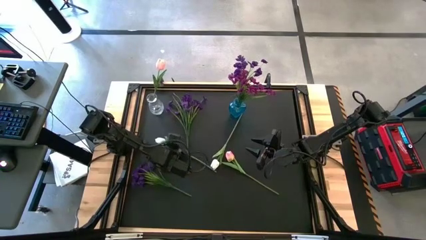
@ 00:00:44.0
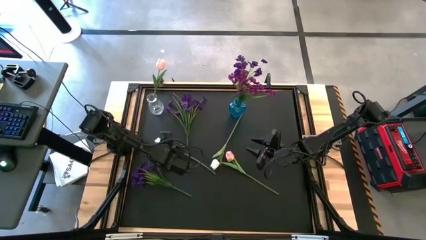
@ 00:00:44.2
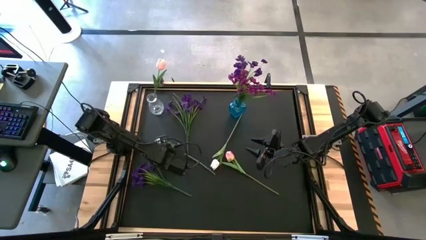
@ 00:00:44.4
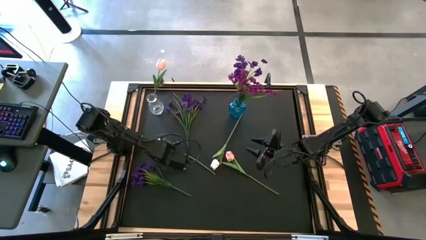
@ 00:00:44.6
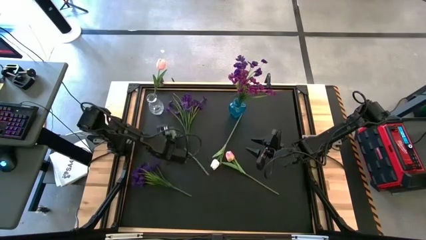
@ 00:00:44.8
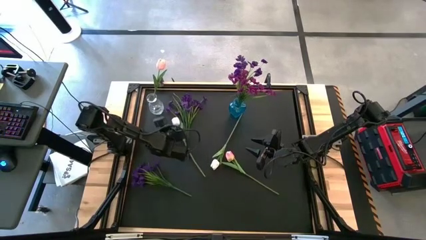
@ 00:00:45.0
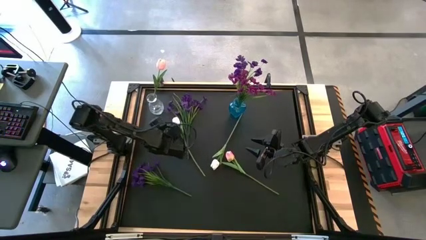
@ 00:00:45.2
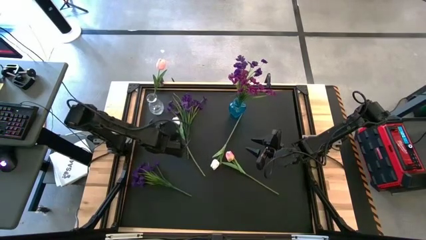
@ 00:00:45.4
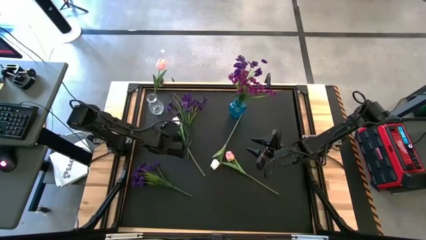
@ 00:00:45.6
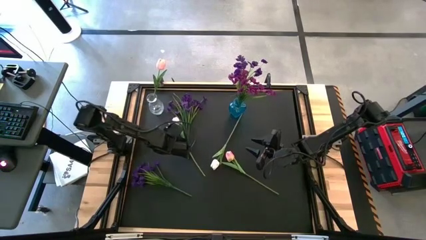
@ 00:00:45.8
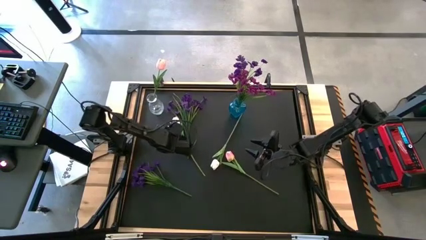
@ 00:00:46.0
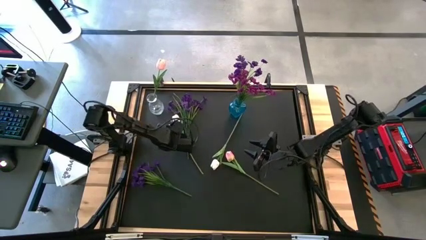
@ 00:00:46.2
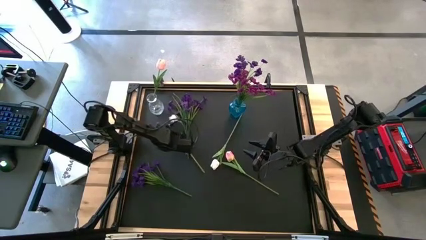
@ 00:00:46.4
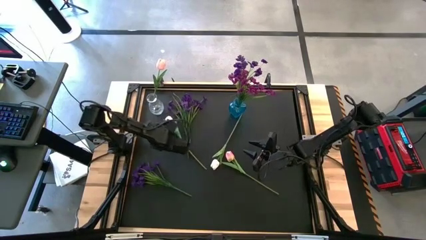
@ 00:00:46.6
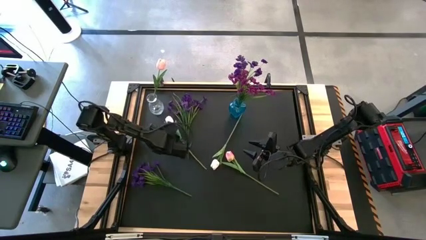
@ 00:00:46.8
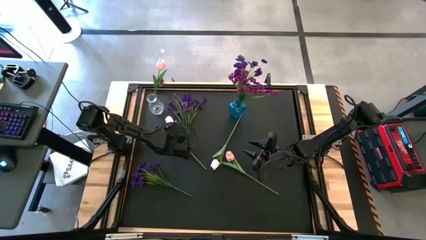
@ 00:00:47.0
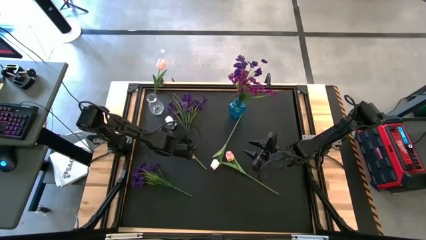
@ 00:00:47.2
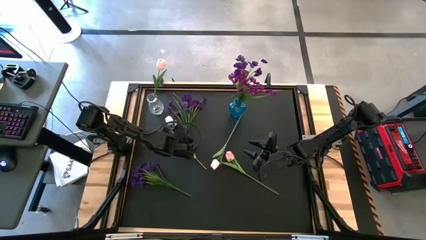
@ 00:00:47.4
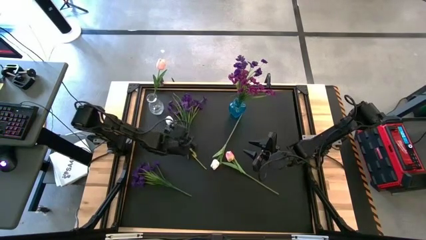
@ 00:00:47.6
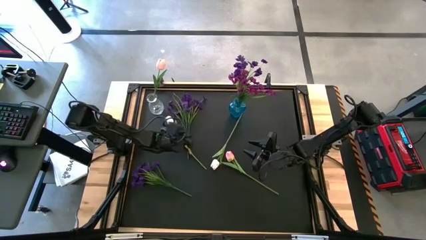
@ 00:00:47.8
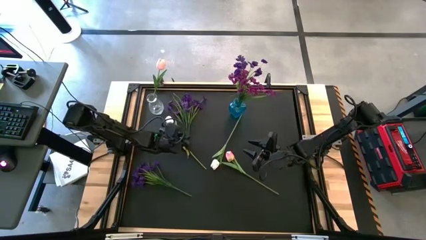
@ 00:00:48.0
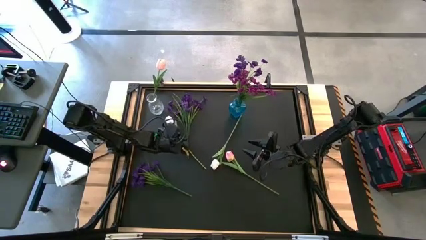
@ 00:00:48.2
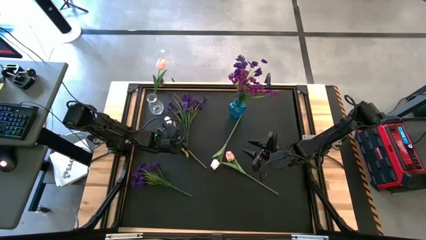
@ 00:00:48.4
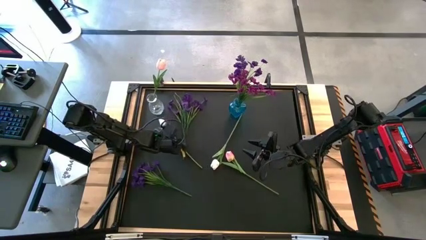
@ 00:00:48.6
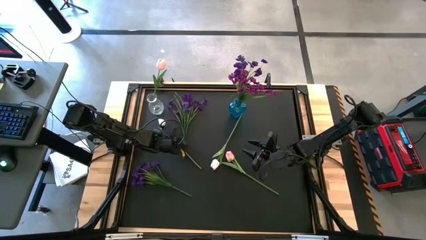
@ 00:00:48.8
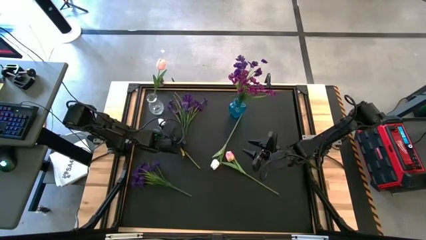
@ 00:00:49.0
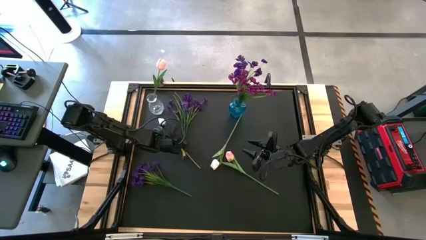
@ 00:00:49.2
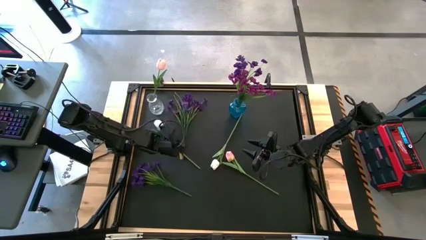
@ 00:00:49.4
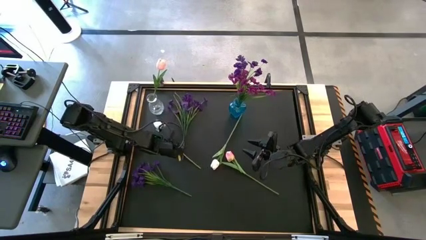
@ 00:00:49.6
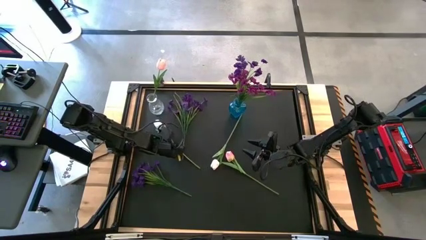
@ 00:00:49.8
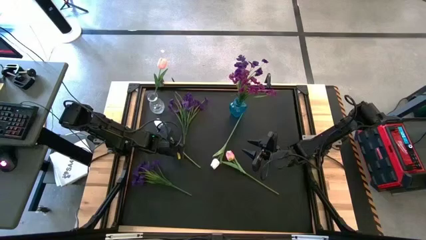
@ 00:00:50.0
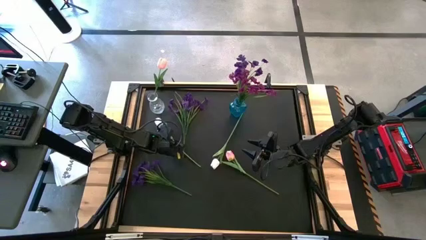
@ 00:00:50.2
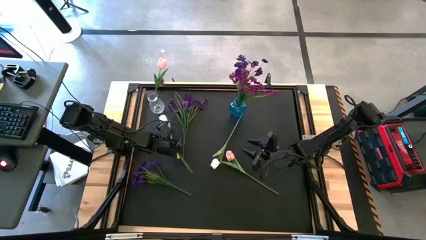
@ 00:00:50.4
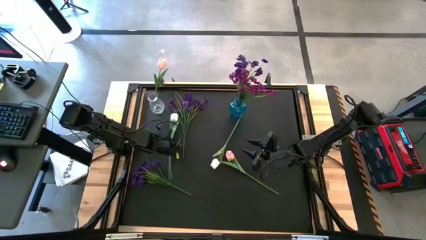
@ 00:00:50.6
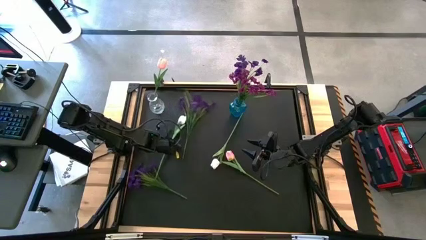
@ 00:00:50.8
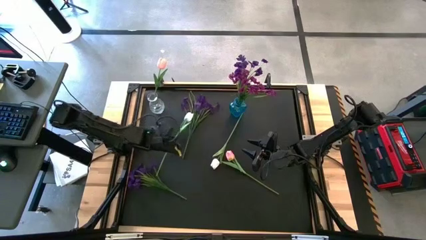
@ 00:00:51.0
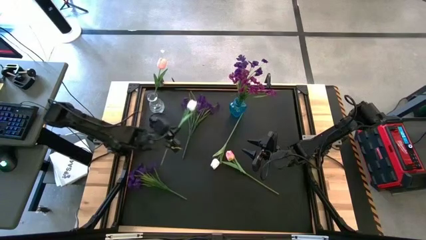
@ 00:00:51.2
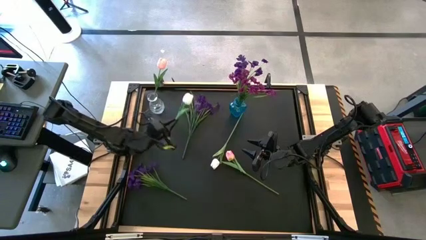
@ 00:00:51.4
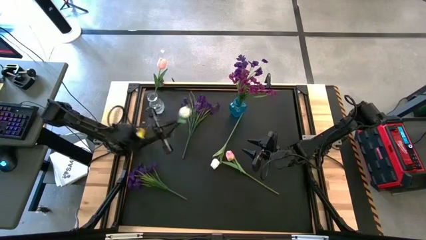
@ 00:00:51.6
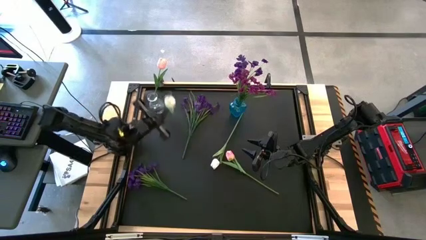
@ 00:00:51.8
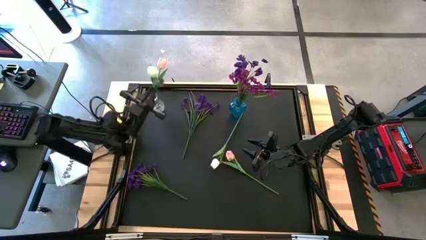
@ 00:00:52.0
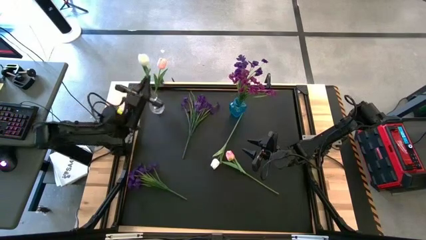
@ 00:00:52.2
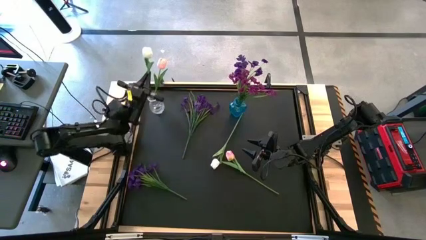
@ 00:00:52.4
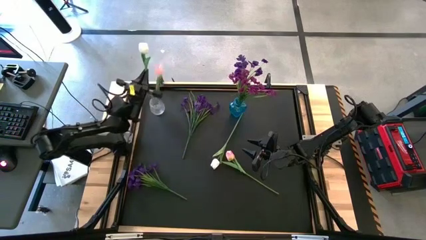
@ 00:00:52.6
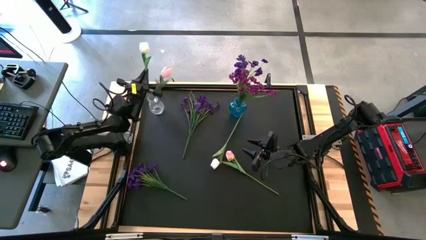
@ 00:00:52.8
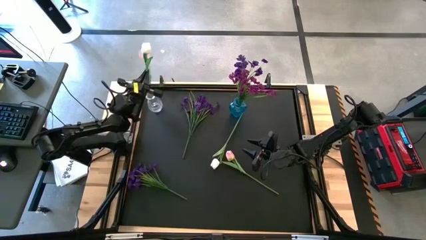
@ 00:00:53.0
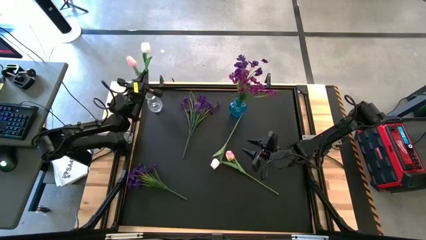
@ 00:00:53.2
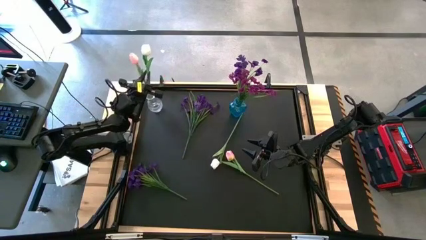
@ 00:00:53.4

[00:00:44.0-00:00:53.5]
Task: Sort flowers into vase by color
Put the left white tulip into the transparent vase
